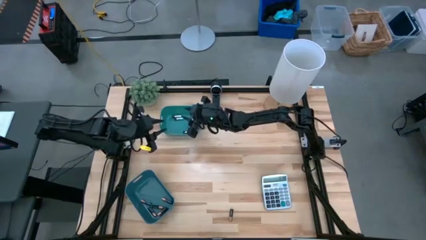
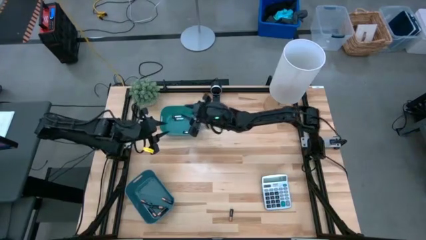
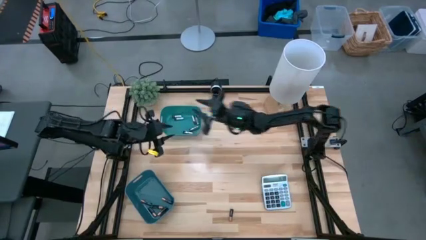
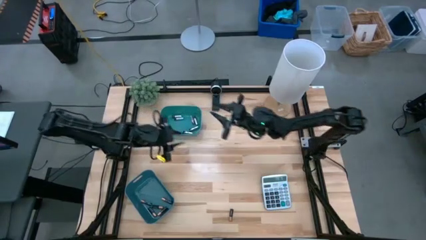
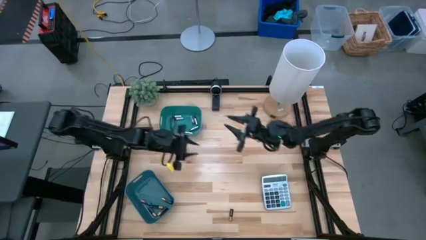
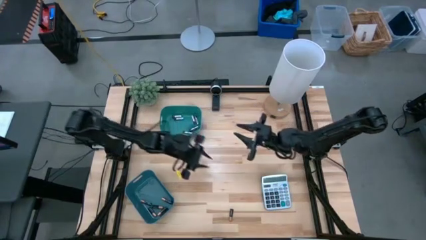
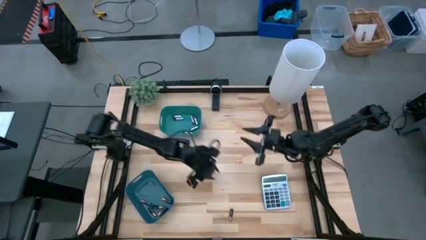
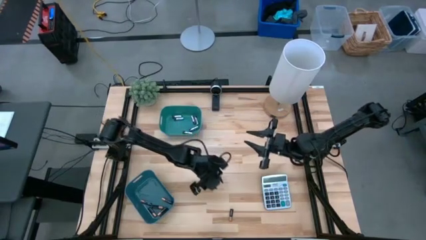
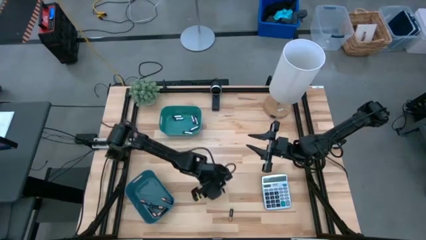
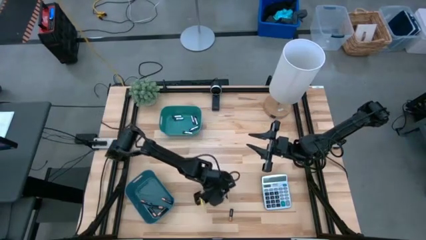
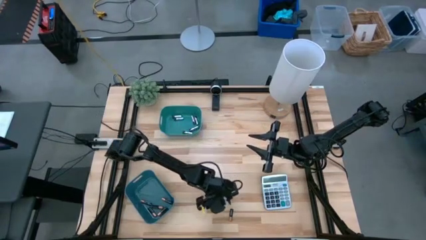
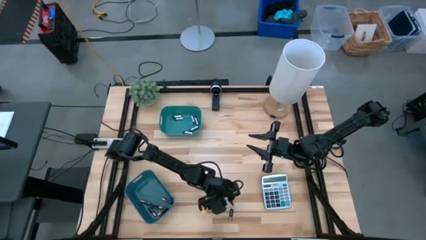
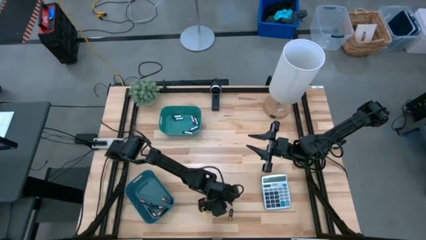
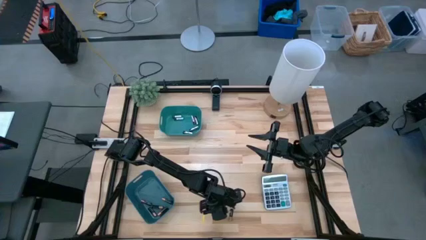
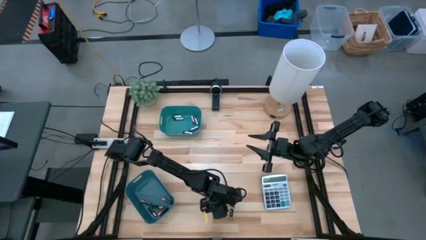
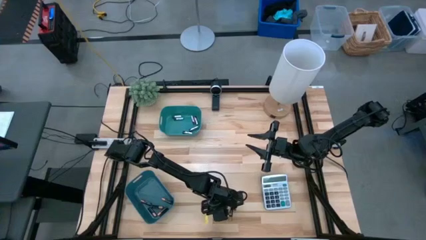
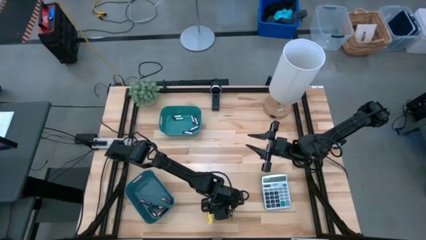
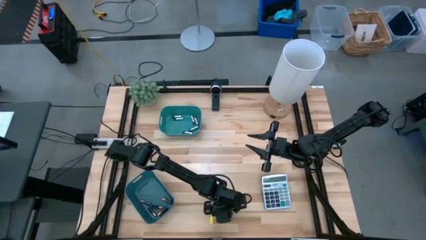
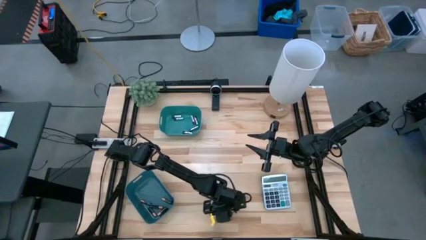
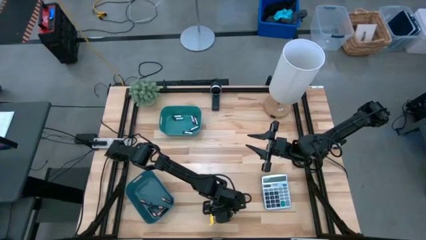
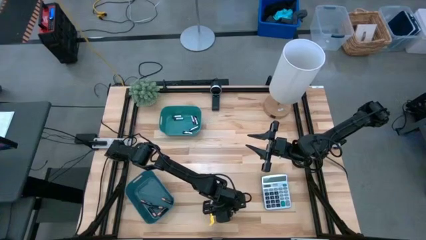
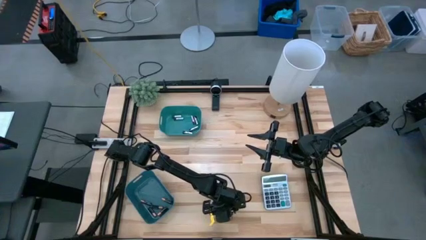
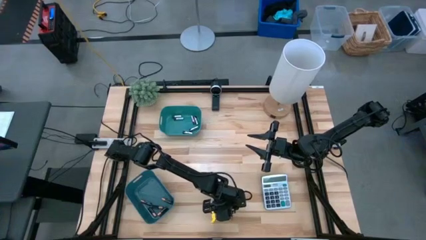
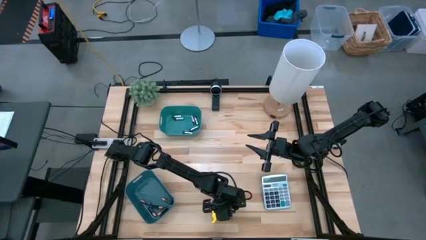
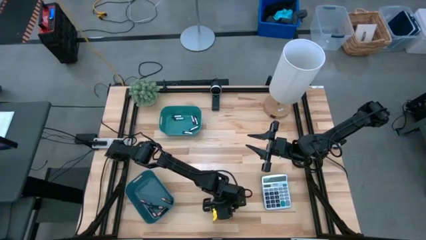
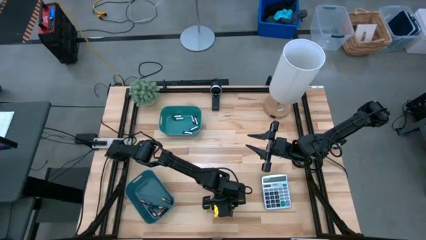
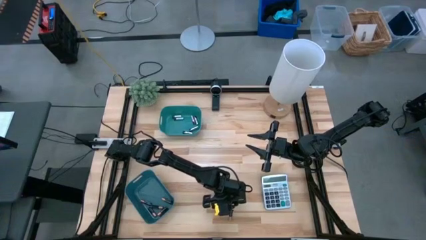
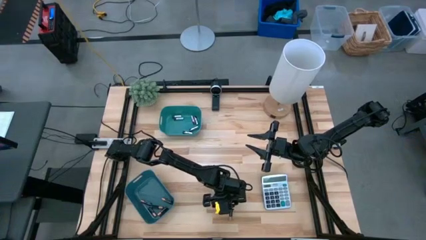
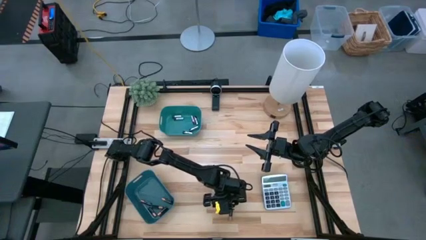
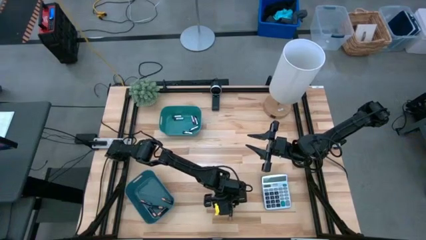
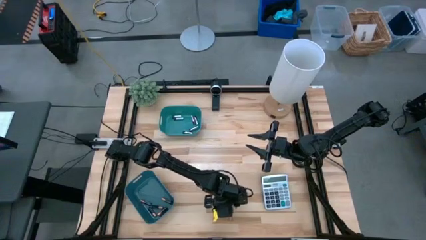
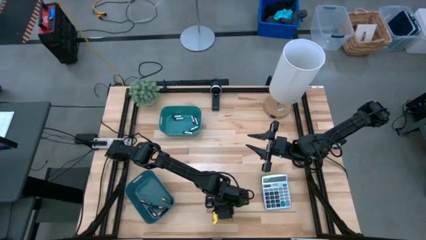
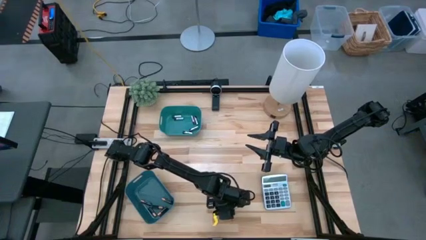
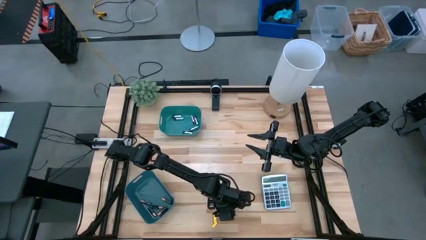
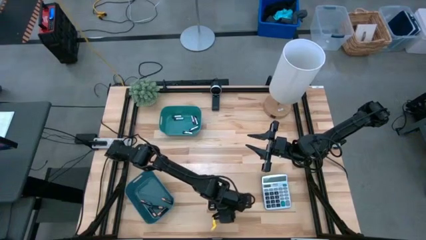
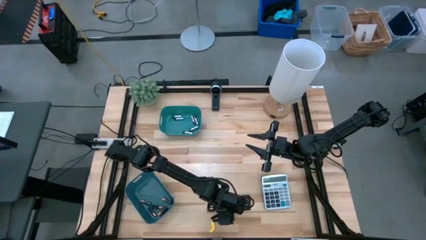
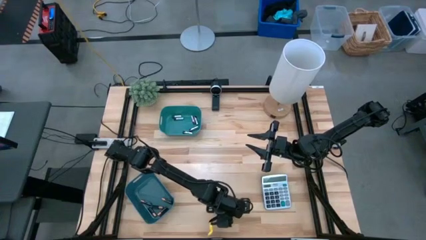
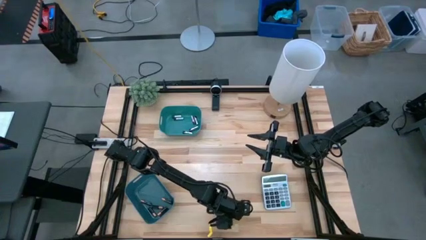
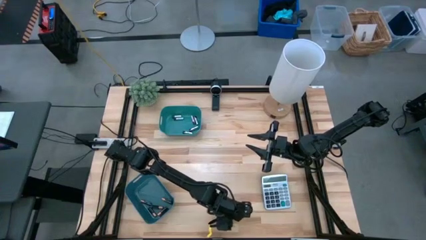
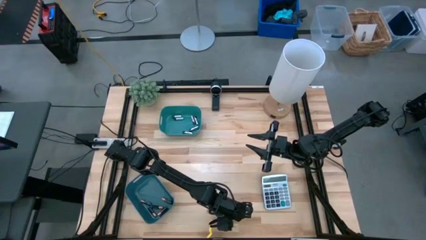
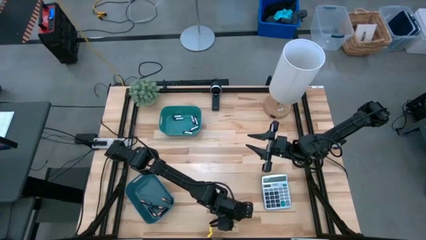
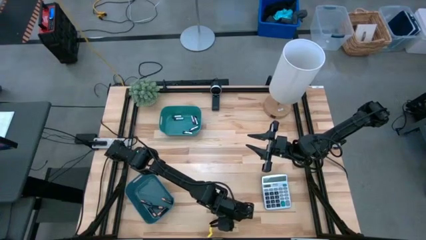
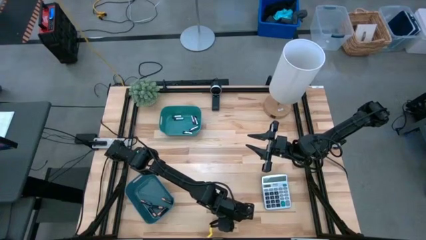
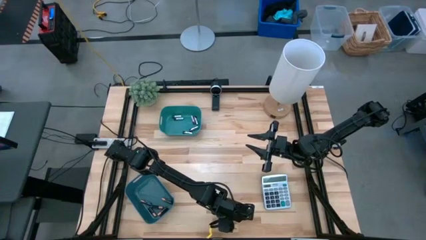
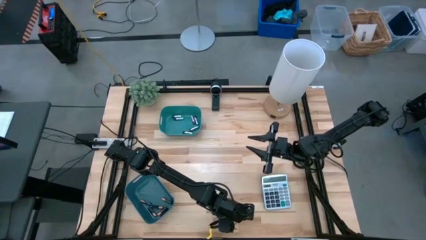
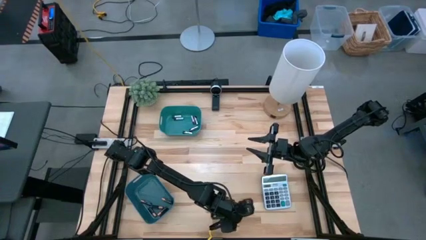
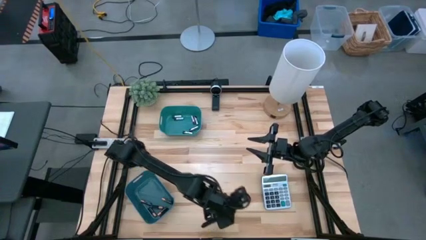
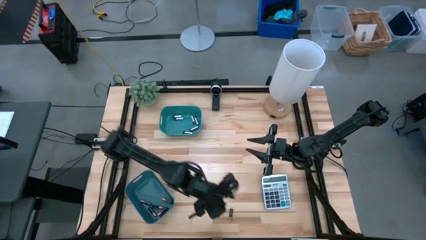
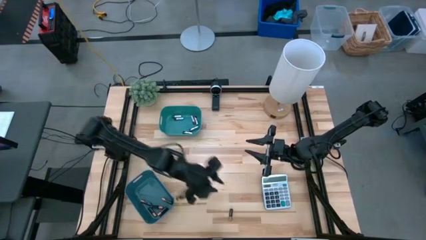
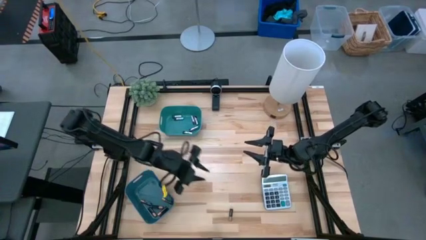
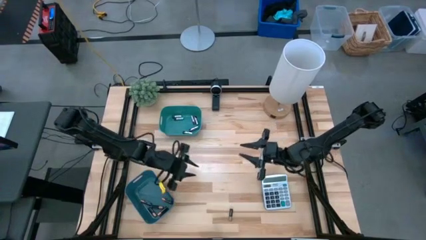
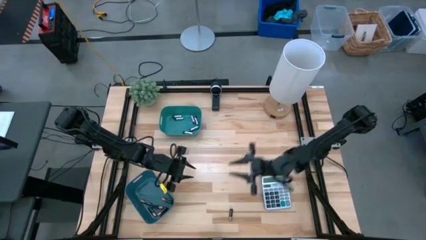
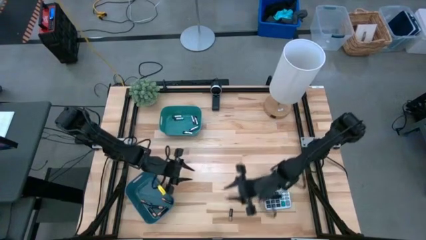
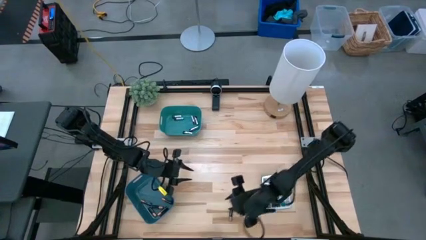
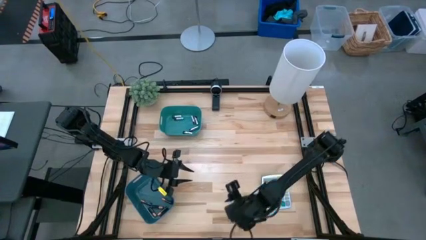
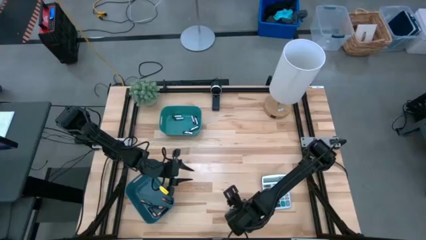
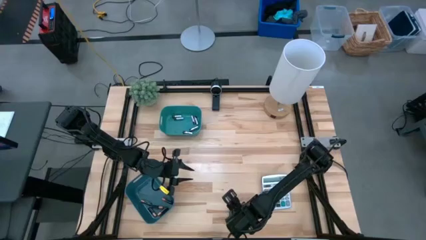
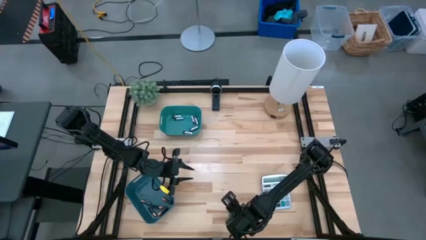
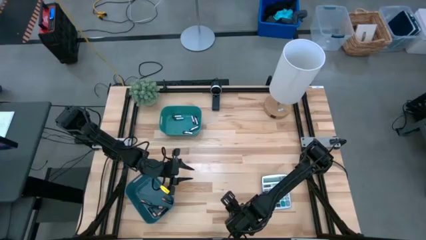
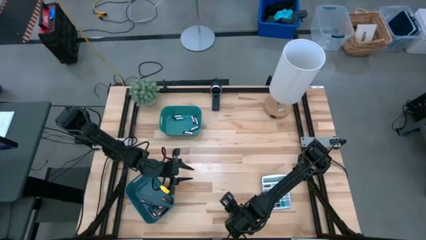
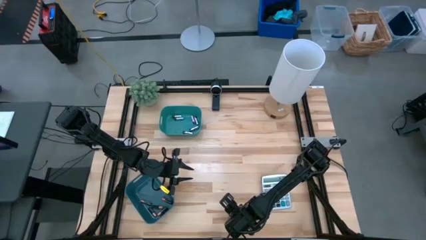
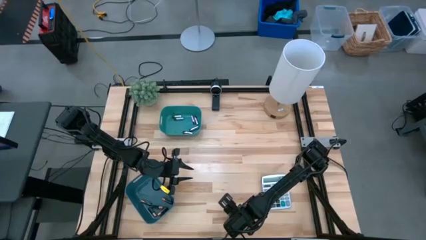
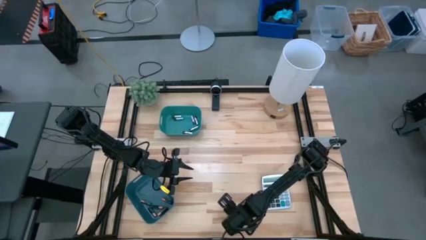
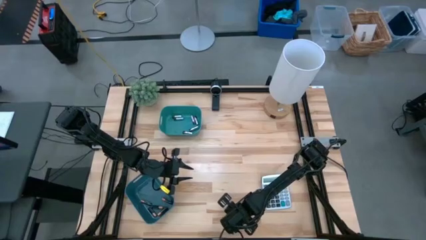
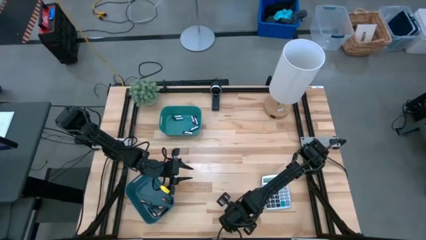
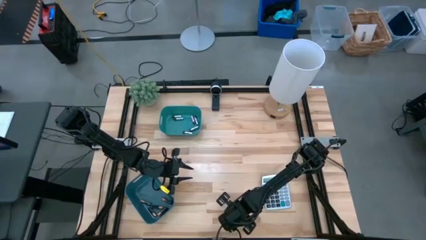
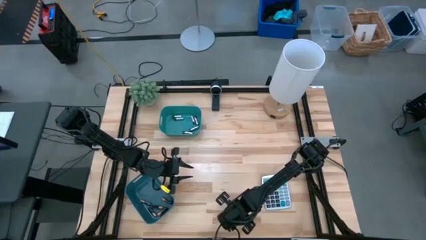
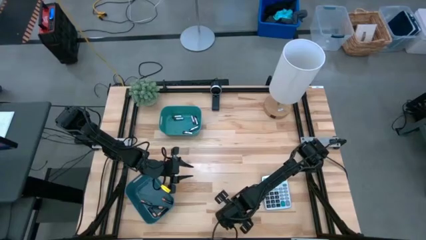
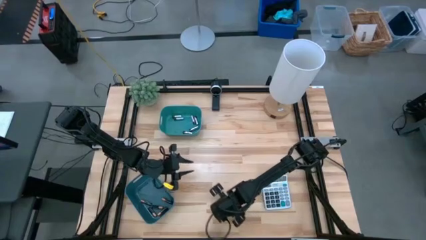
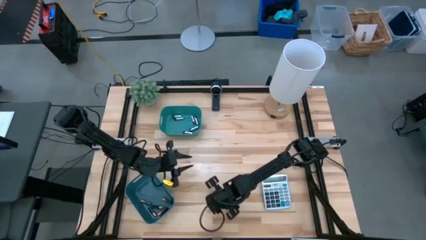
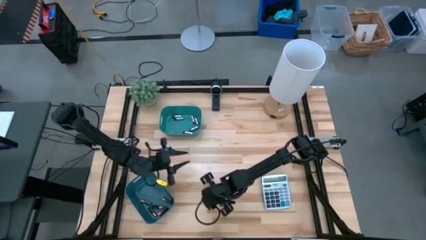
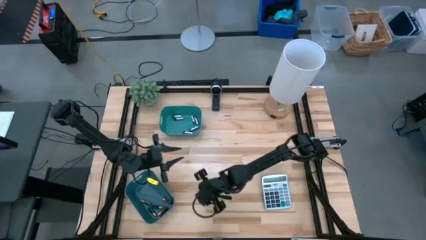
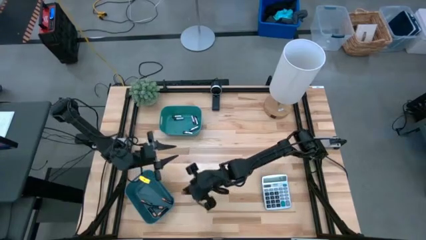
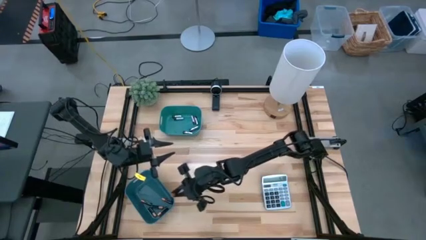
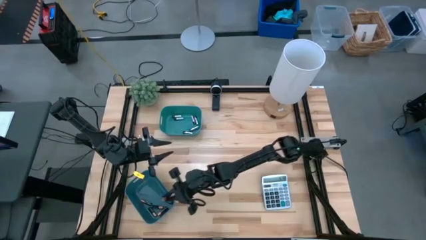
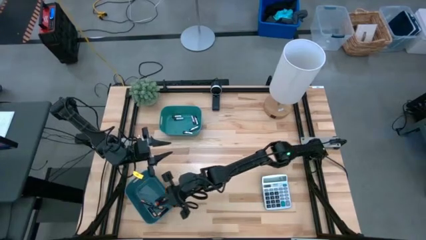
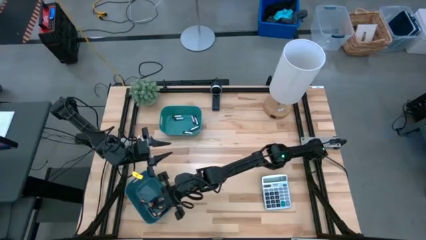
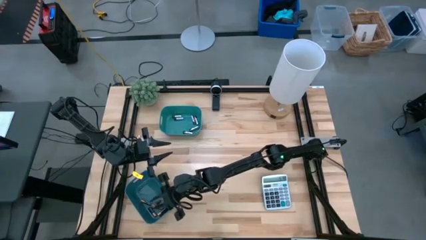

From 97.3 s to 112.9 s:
Task: Sort batteries
Put the black battery into the blue bin
